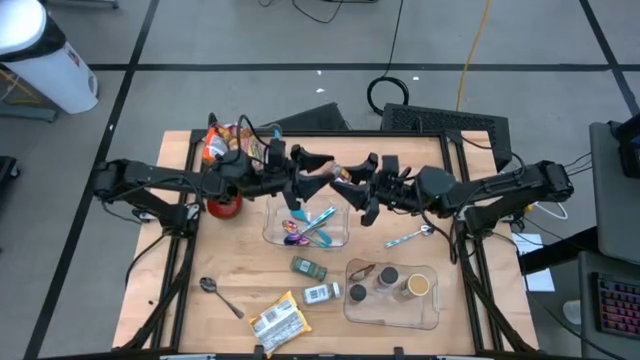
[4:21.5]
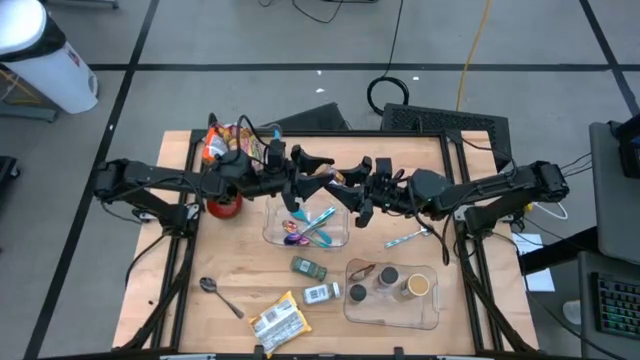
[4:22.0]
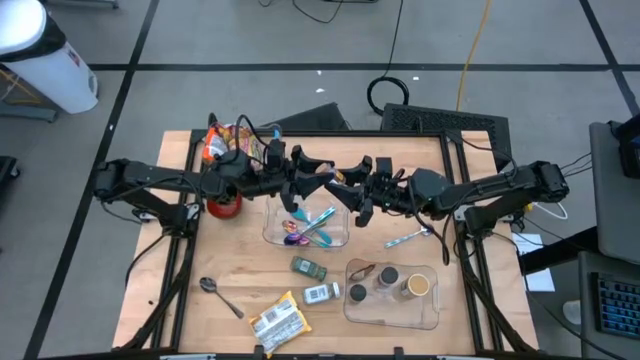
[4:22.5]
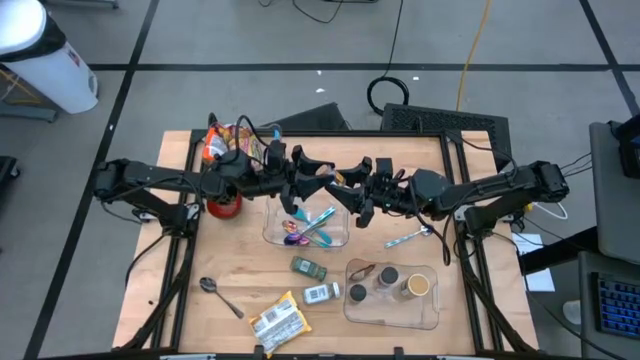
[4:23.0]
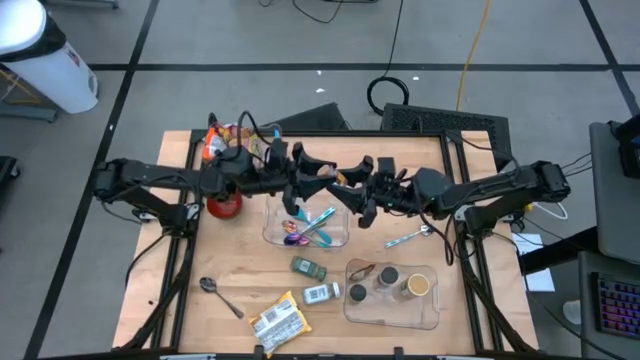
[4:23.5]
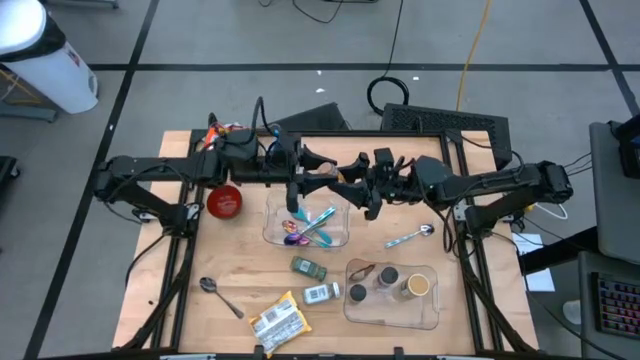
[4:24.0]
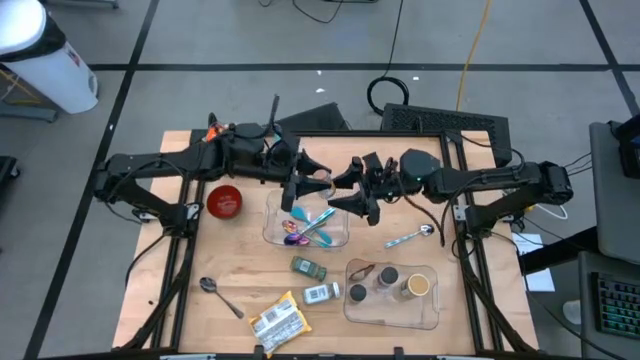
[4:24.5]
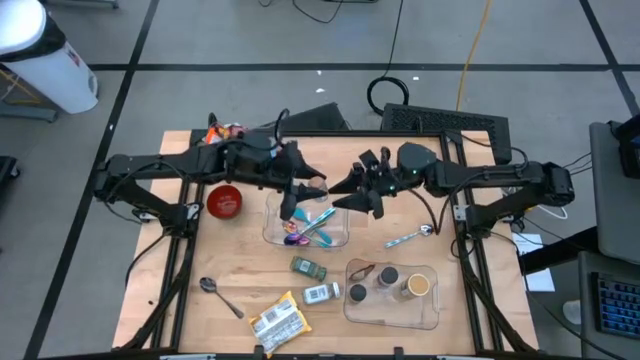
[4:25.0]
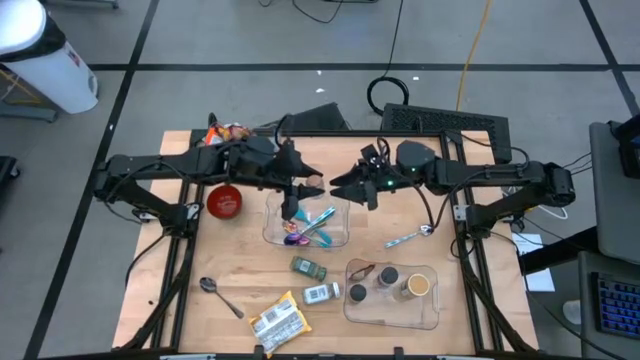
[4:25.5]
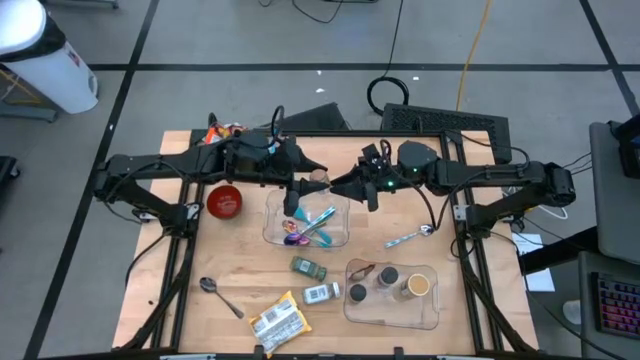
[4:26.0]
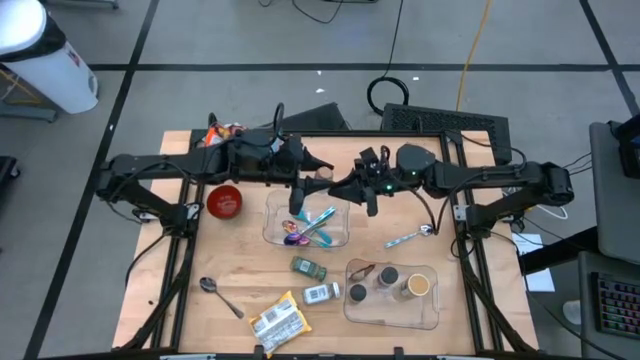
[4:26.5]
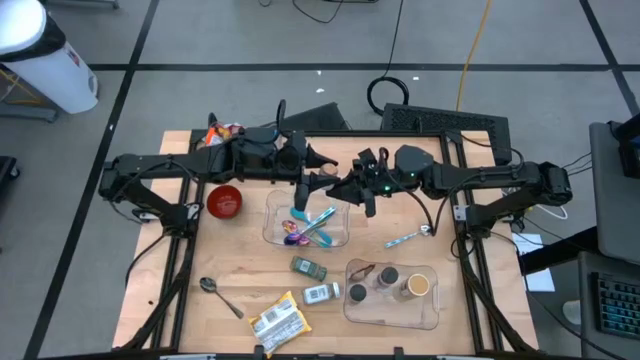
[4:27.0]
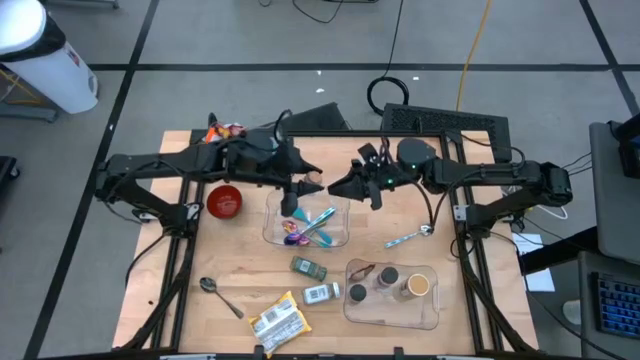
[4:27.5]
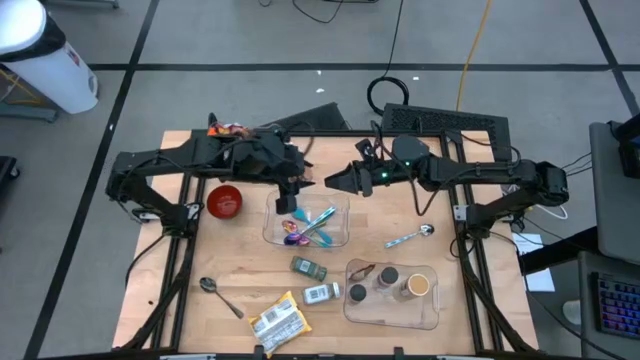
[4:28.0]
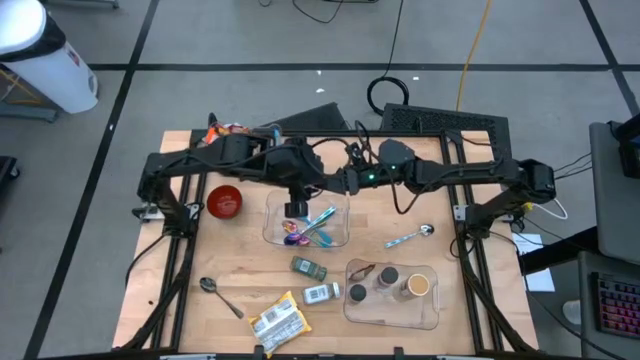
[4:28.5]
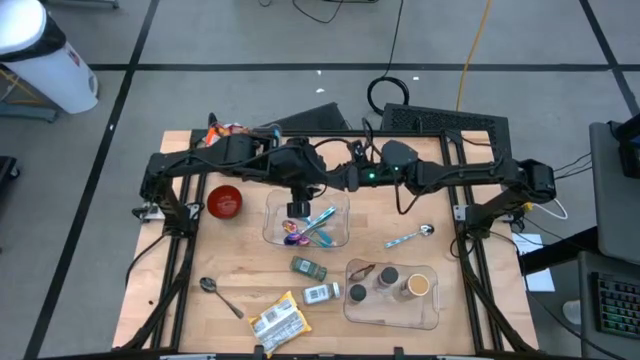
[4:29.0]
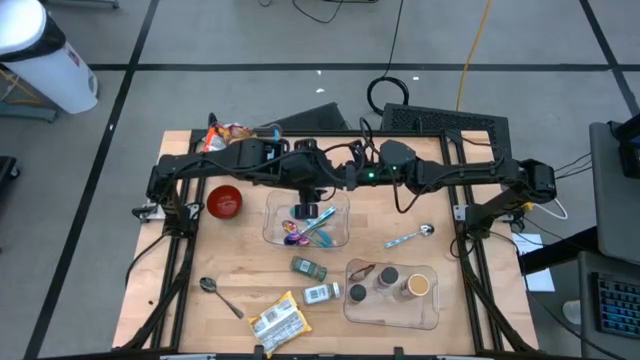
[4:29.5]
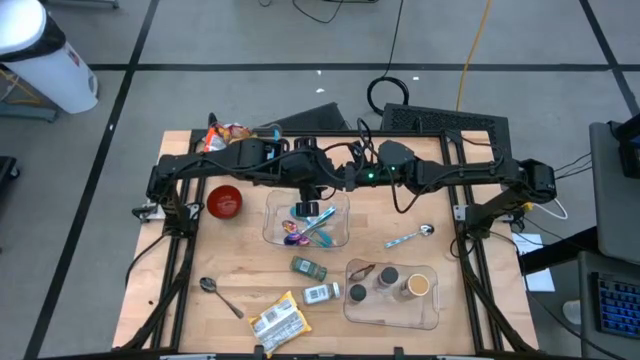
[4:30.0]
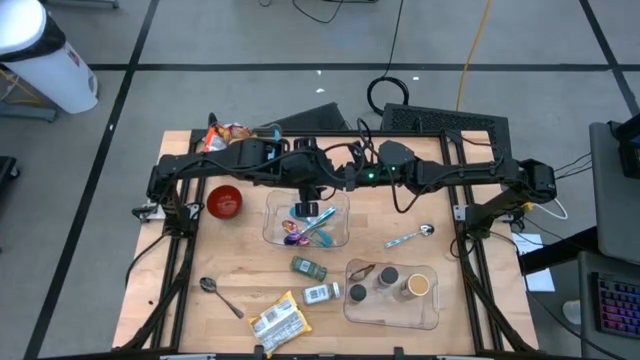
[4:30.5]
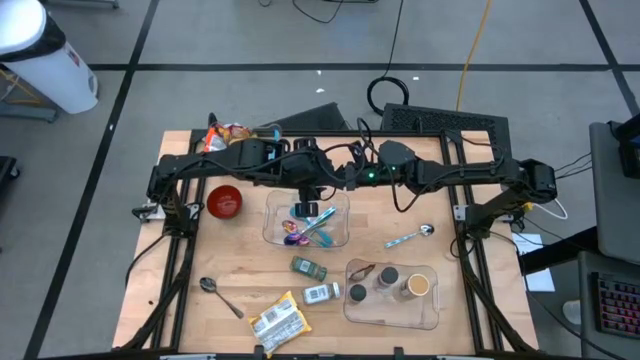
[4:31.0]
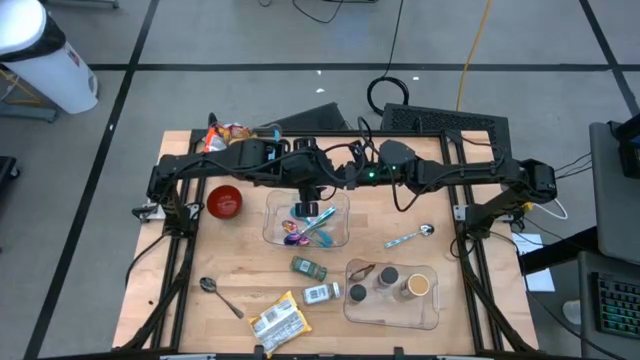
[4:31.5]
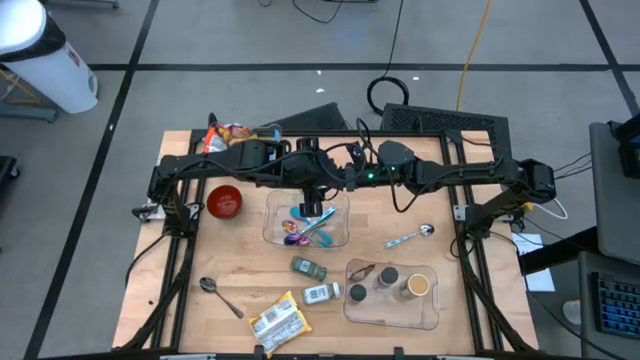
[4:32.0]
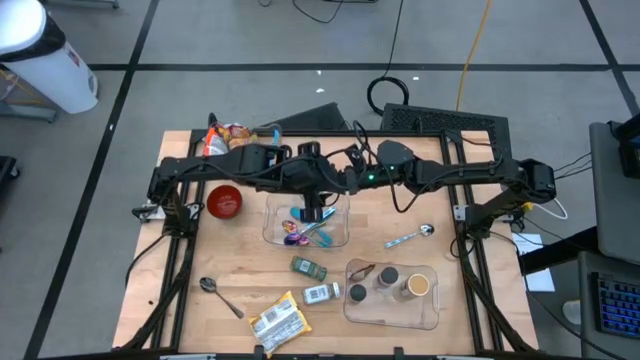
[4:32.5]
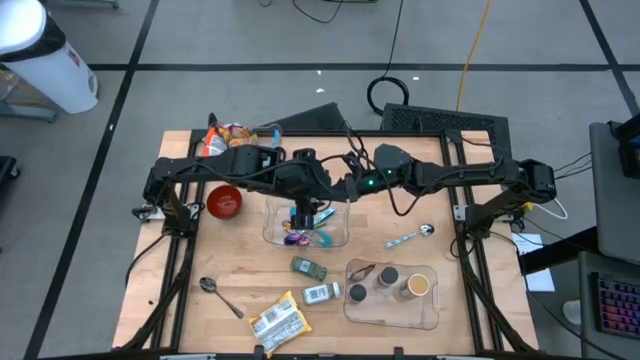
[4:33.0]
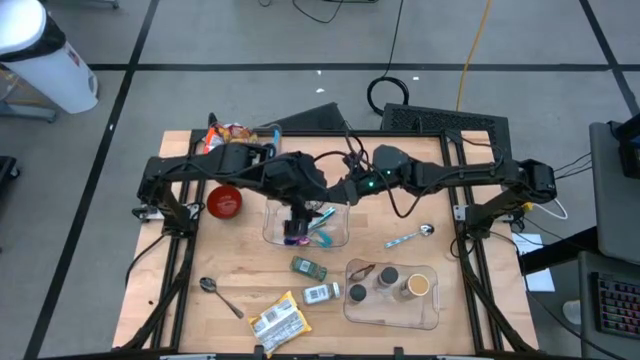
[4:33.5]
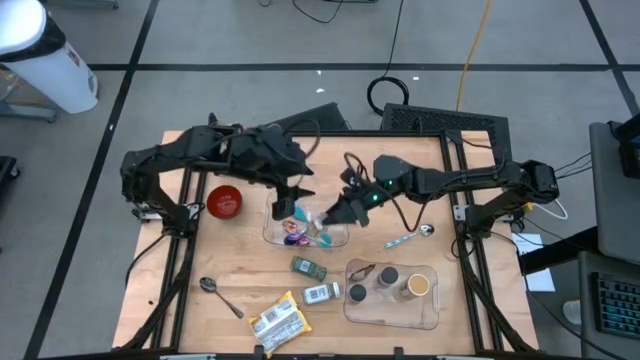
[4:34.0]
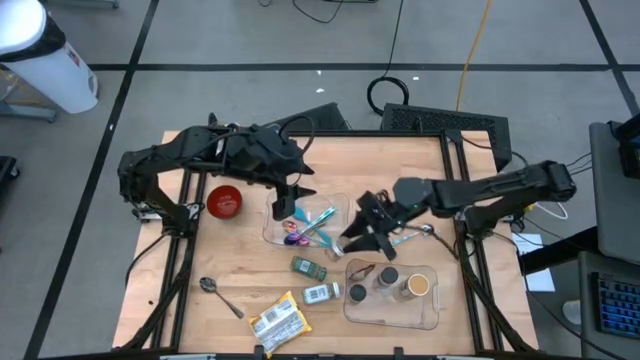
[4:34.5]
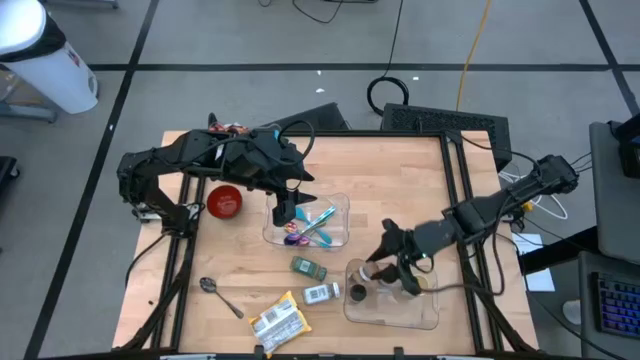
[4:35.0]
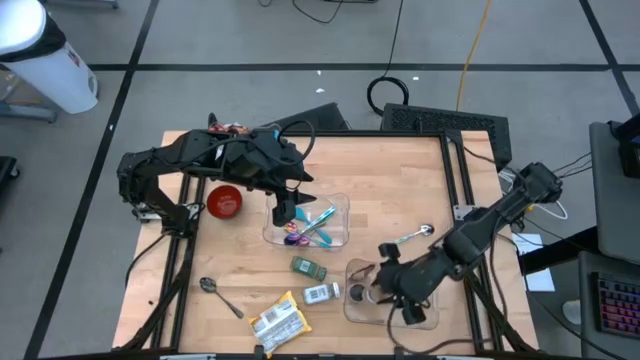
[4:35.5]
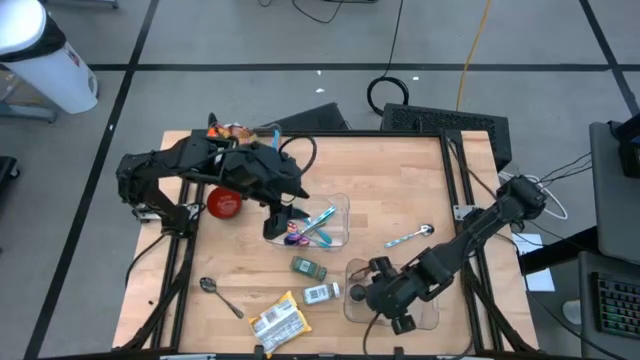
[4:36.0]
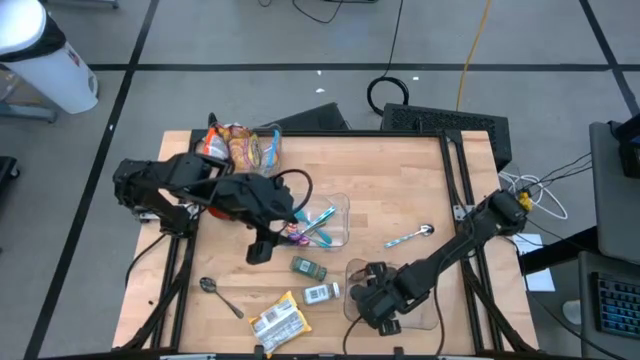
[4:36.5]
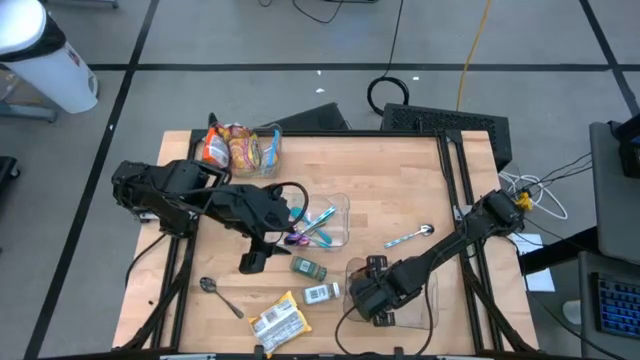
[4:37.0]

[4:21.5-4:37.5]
Task: Pick & Place Food Item
Put the brown seasoning bottle into the bottom transparent bin

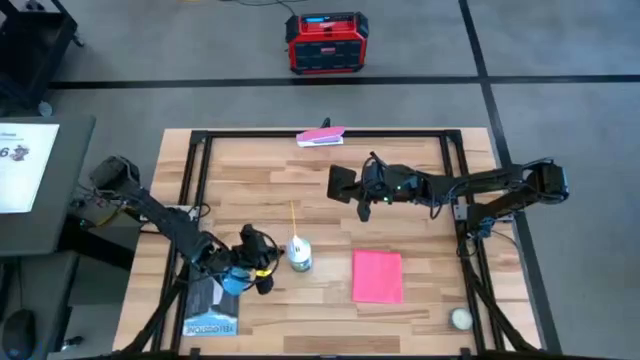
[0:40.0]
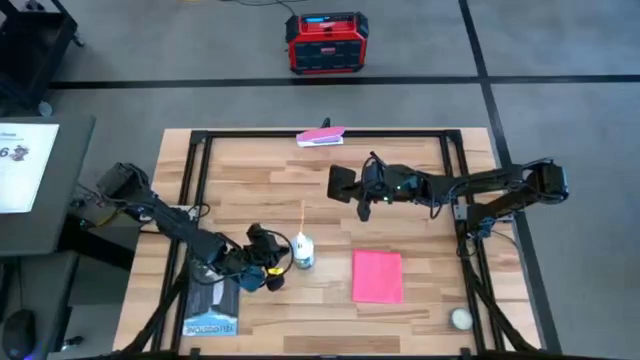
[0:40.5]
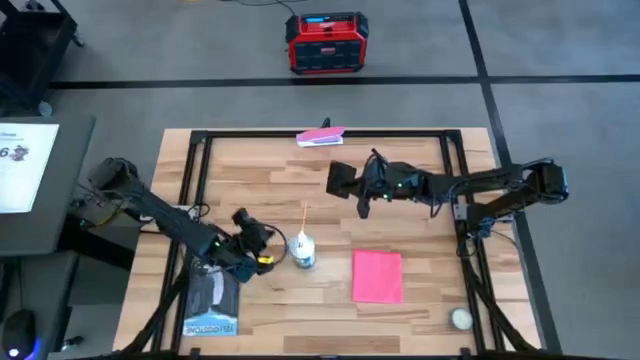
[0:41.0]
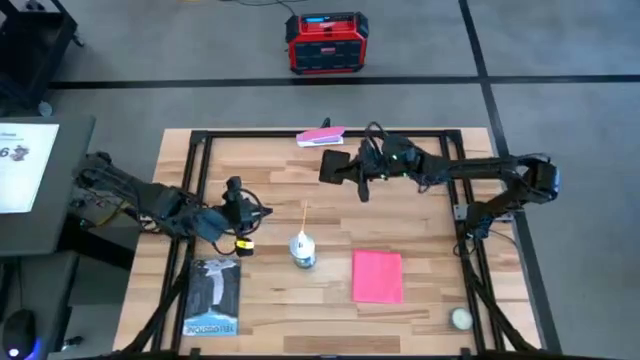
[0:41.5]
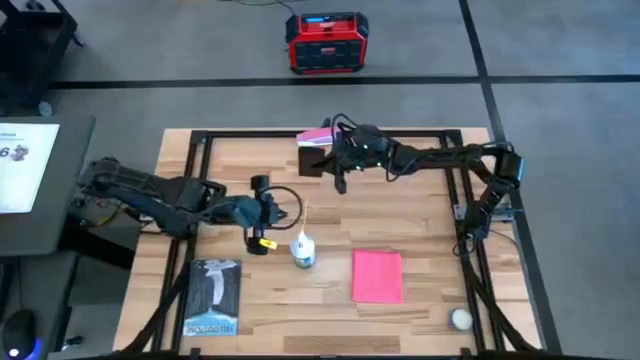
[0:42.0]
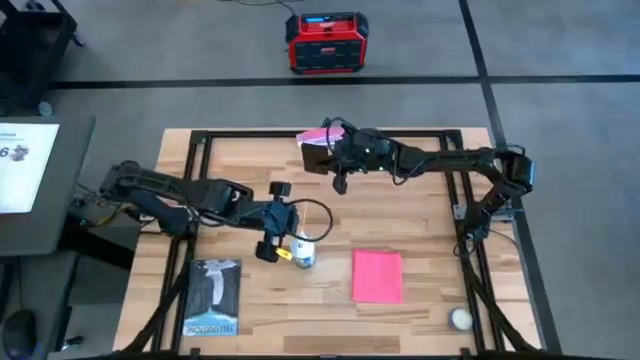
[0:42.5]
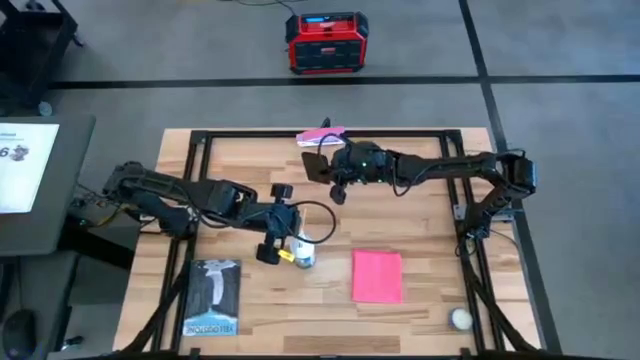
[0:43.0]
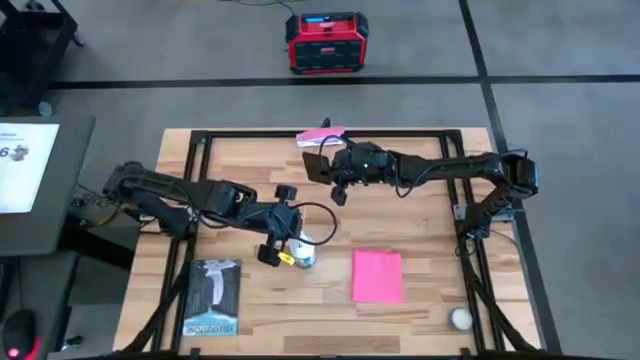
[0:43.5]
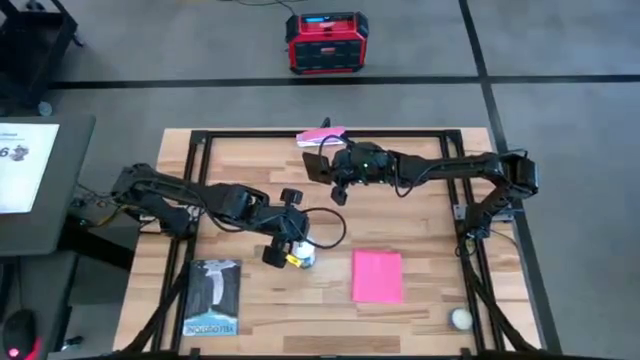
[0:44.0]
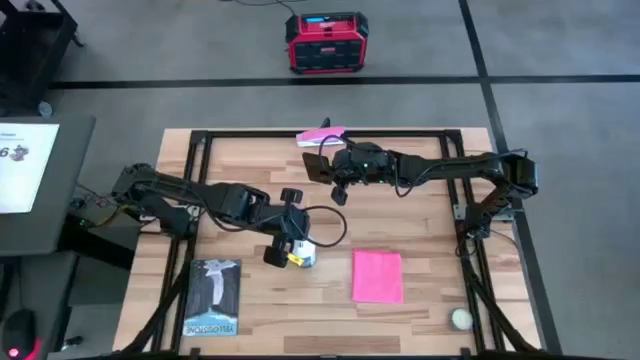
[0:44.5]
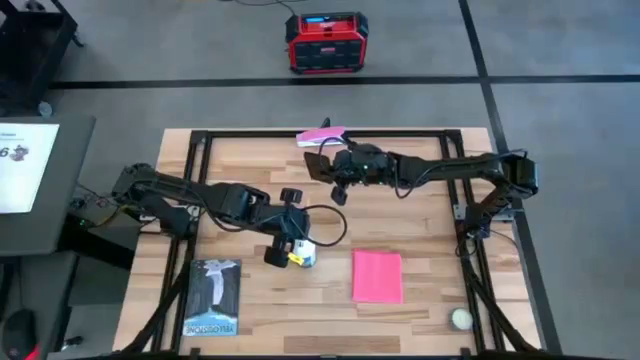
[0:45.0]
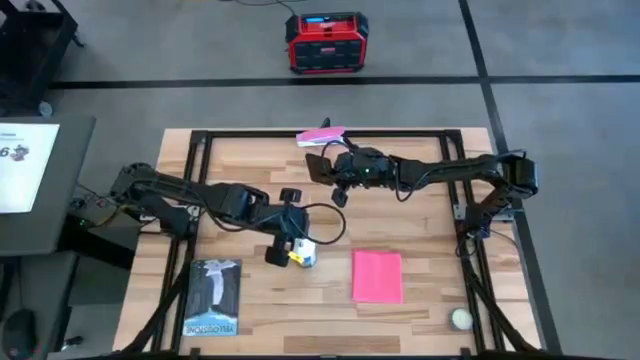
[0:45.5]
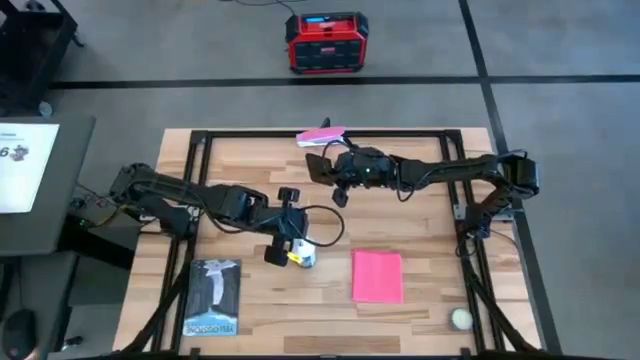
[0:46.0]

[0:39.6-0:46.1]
Task: Apply microfiber cloth
Spray the black cellphone
